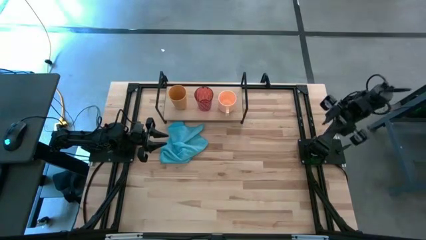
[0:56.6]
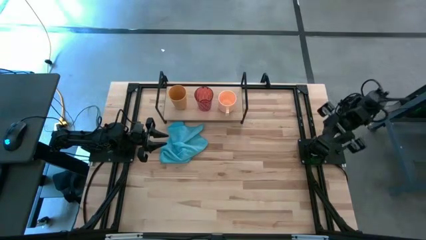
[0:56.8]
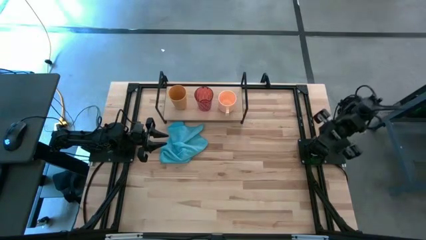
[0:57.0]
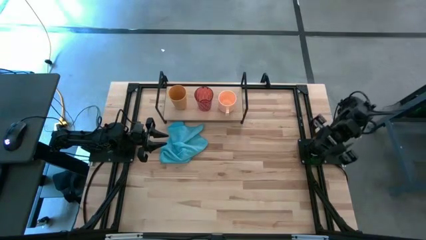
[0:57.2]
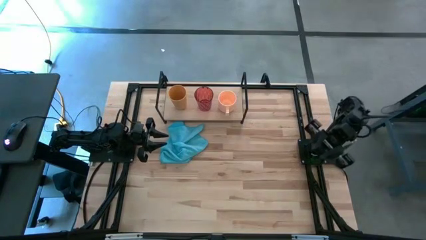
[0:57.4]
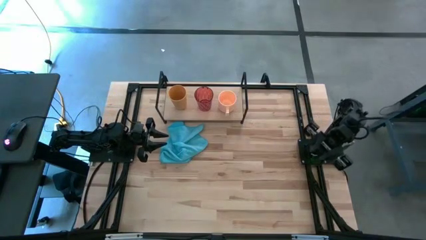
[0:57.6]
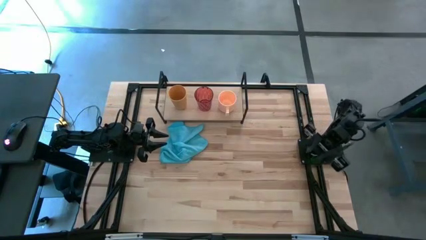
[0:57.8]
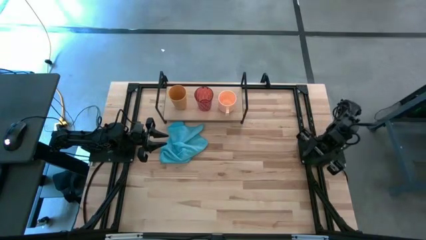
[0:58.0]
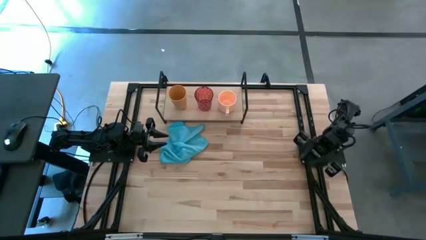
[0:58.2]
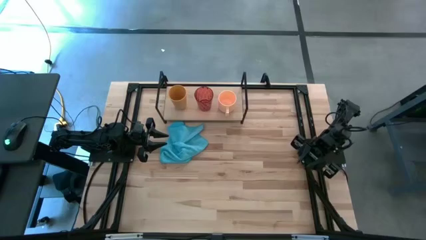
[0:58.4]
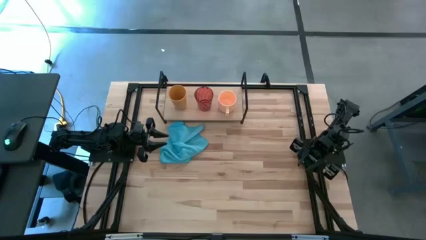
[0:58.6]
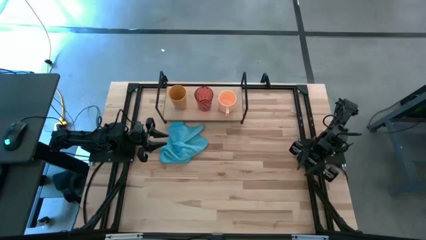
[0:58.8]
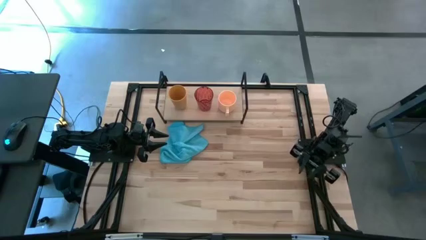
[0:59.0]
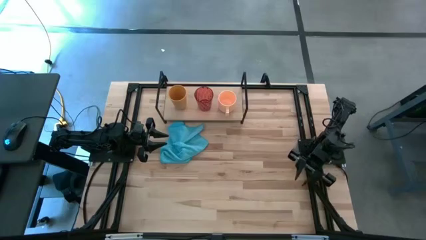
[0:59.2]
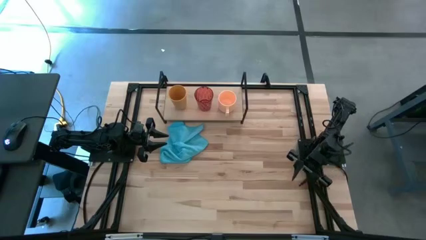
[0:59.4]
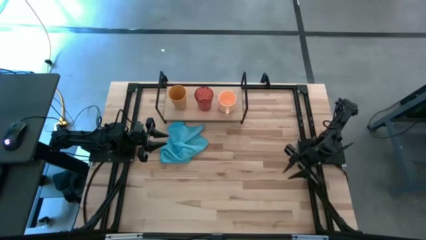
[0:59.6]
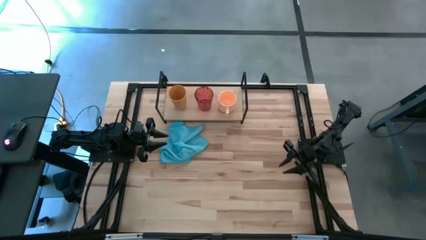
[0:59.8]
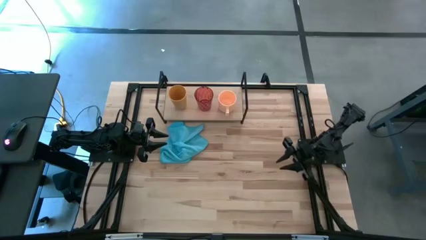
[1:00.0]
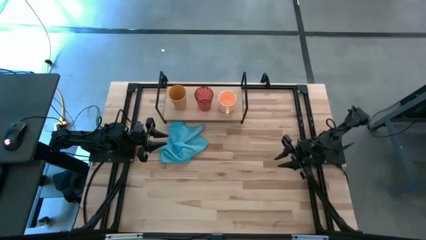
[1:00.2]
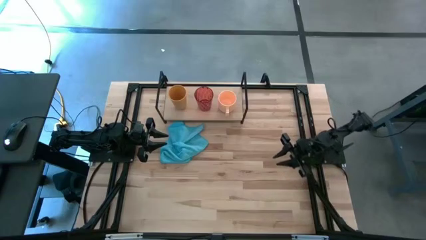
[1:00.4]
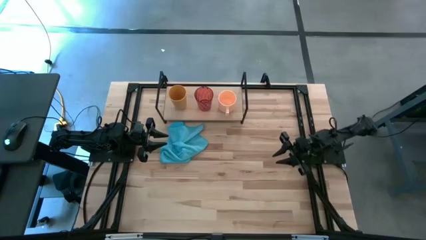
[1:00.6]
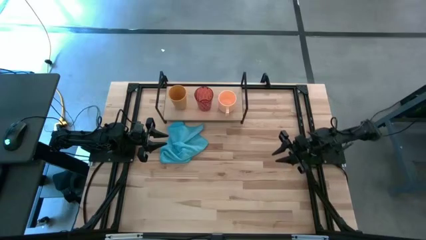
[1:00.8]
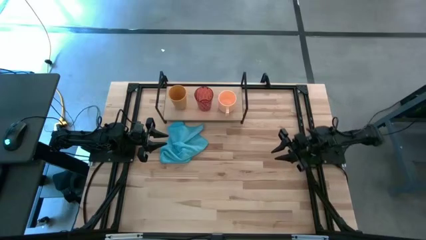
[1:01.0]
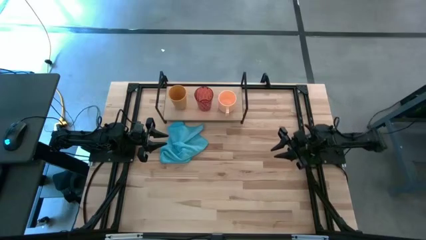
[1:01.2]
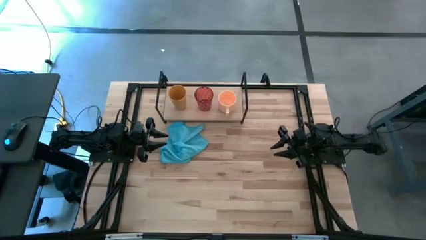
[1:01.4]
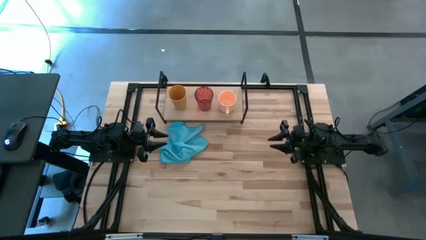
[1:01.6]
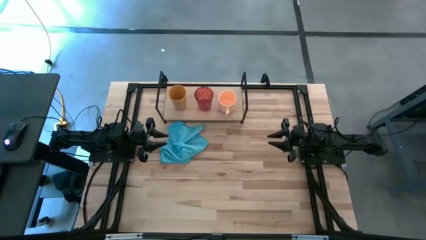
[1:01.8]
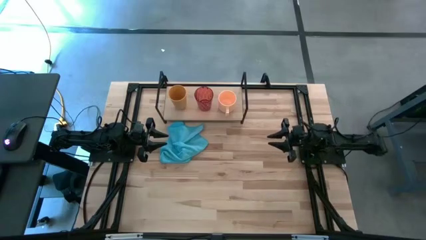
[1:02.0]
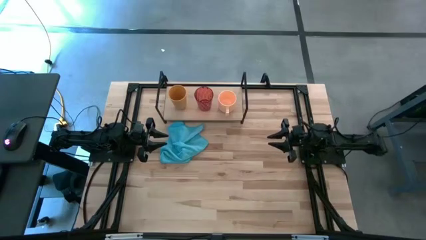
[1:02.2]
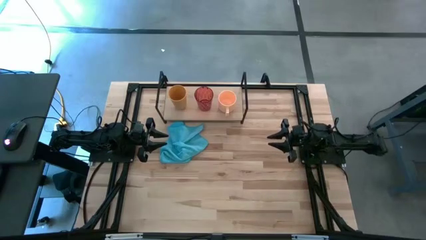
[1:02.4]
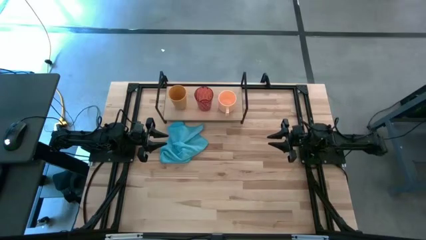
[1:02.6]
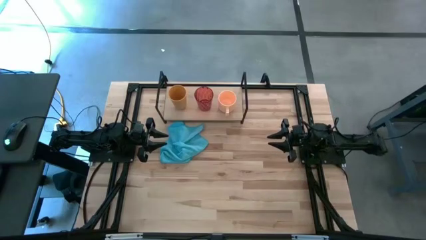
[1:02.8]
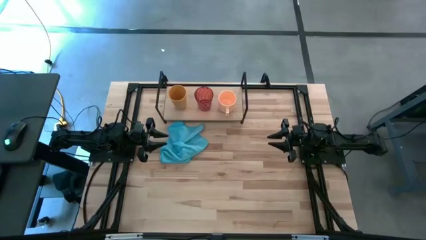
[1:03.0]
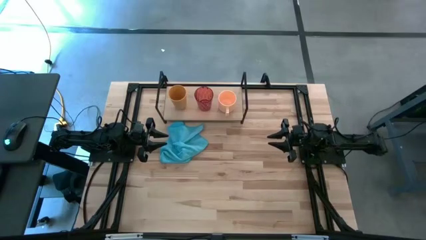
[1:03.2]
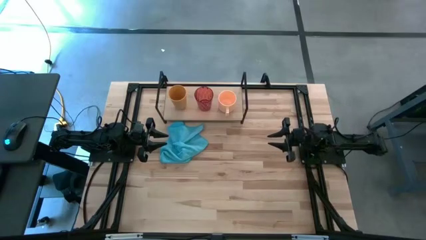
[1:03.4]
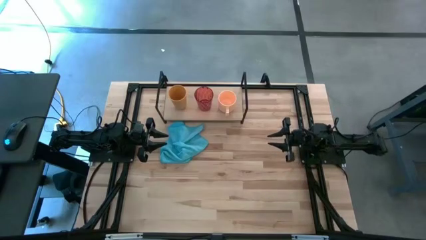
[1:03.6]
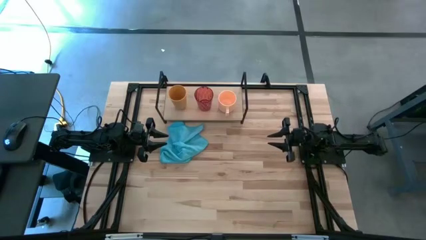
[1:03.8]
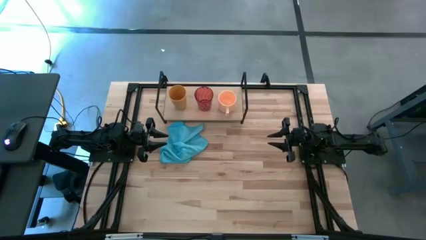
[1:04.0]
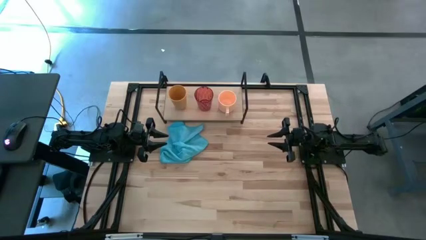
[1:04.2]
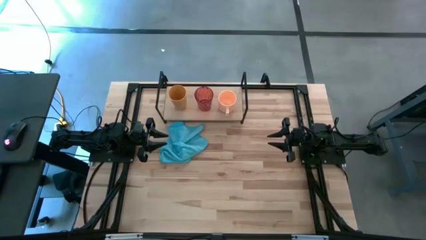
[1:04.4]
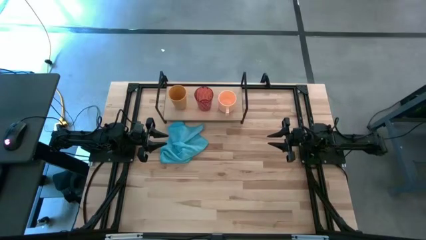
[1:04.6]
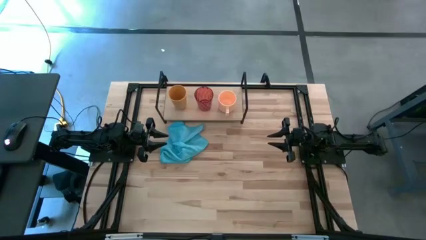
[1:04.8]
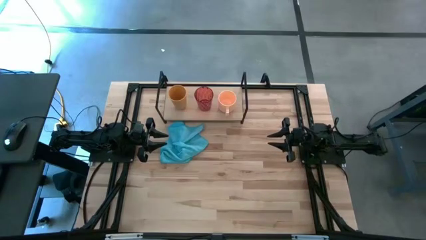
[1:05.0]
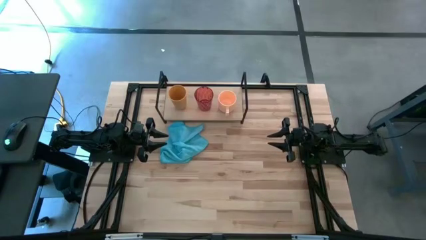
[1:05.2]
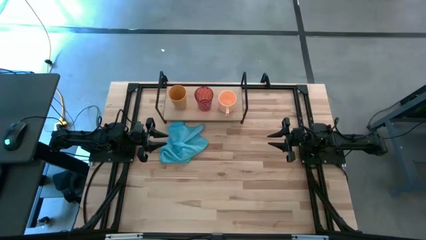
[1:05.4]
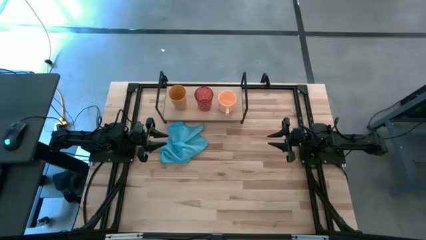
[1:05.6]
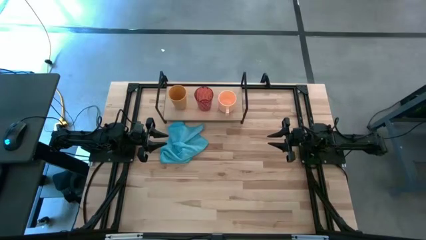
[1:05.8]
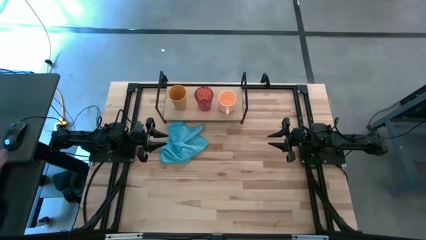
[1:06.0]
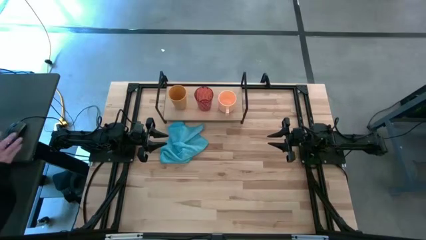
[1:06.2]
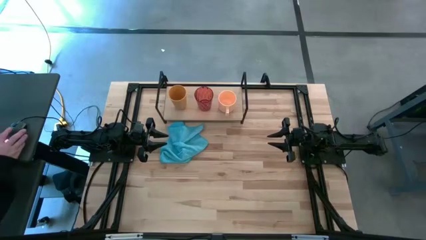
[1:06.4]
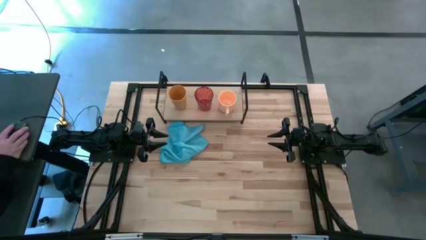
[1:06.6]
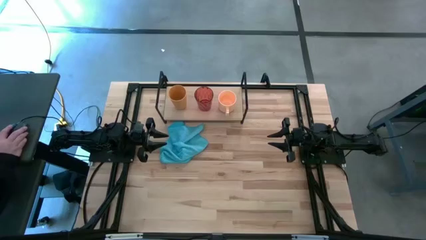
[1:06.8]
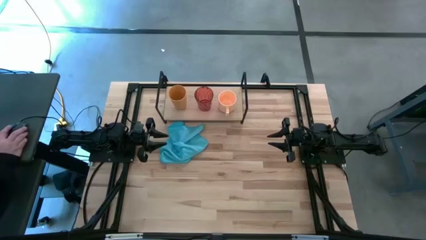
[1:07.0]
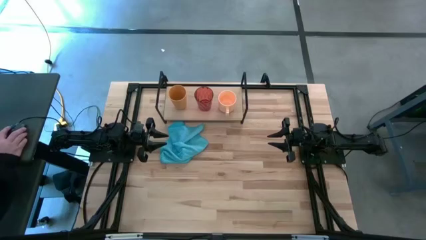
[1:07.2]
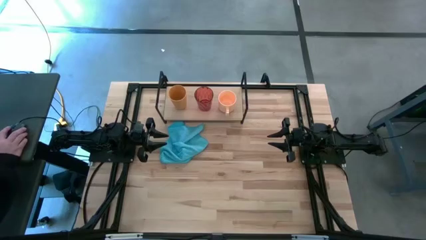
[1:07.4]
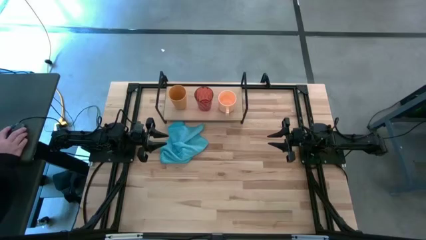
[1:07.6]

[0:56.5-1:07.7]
Task: Stack small to large cups/mugs on shelf
Return to Home Position
